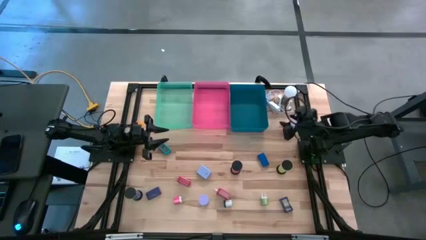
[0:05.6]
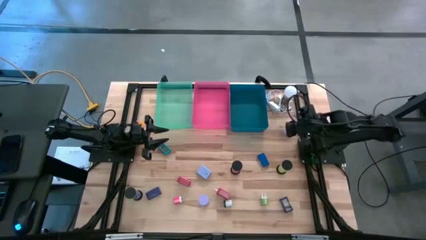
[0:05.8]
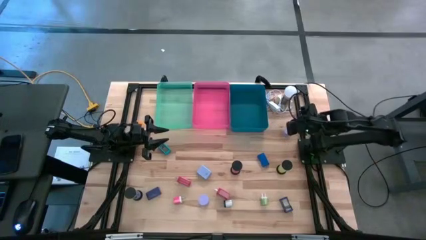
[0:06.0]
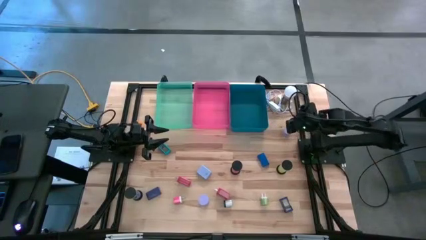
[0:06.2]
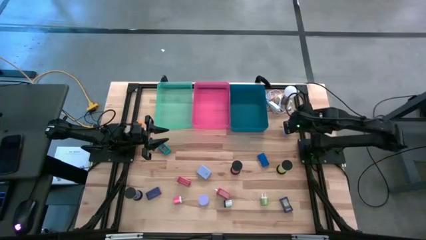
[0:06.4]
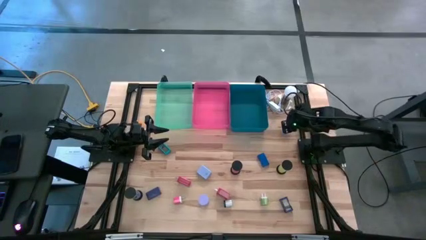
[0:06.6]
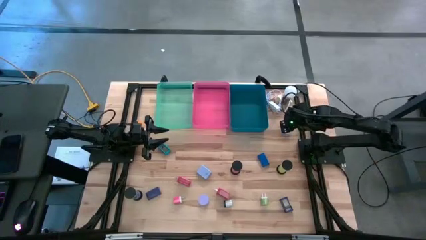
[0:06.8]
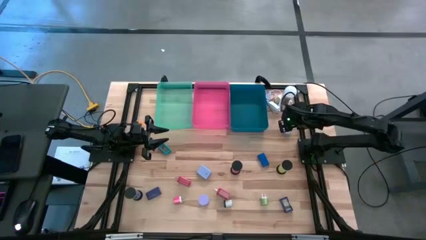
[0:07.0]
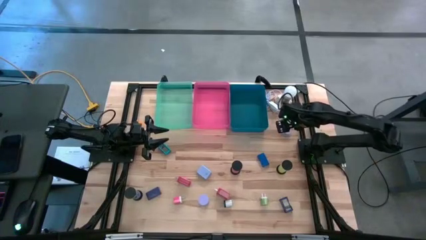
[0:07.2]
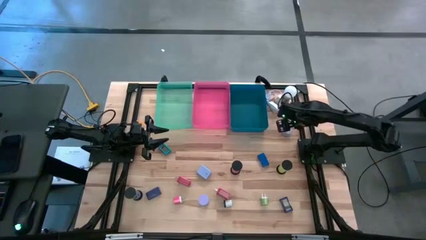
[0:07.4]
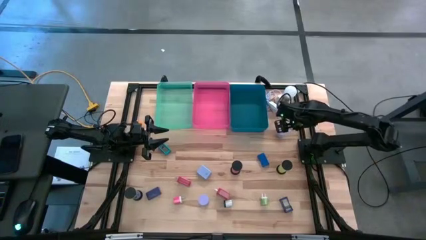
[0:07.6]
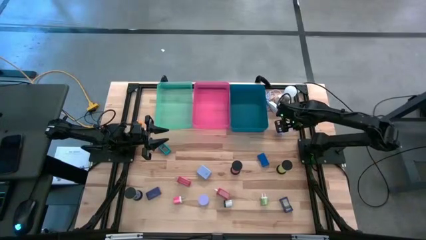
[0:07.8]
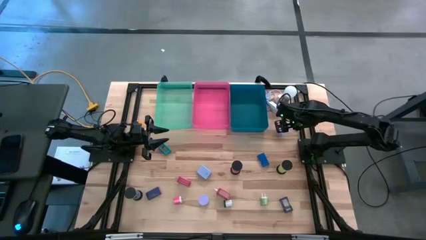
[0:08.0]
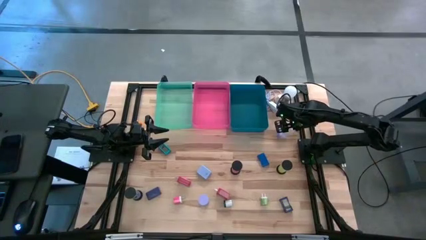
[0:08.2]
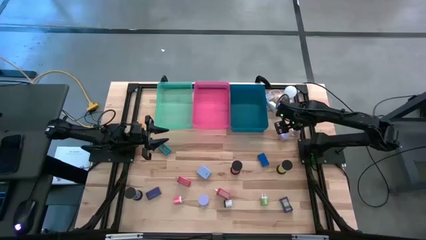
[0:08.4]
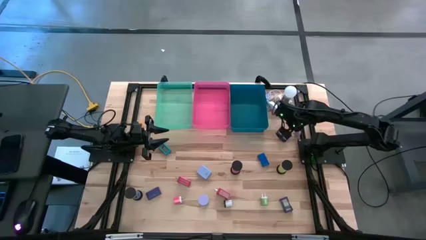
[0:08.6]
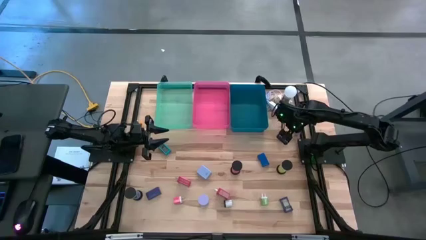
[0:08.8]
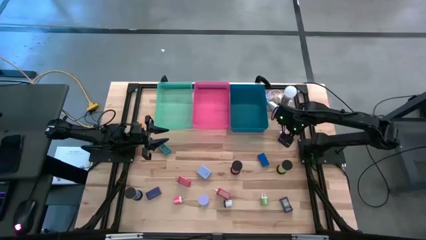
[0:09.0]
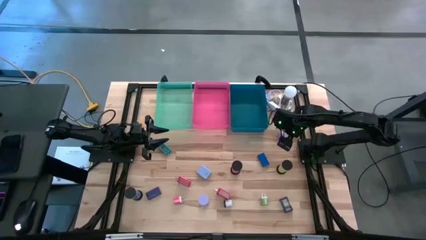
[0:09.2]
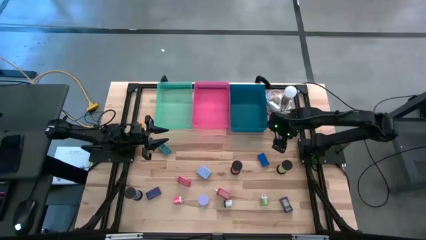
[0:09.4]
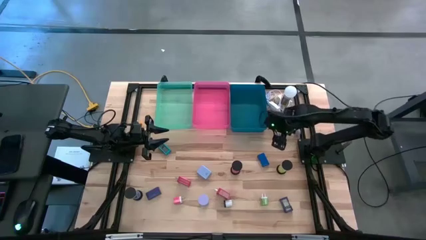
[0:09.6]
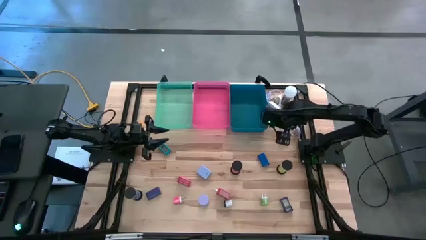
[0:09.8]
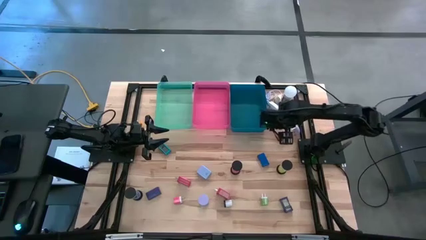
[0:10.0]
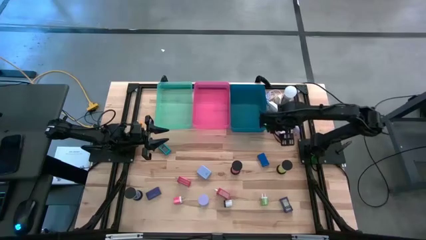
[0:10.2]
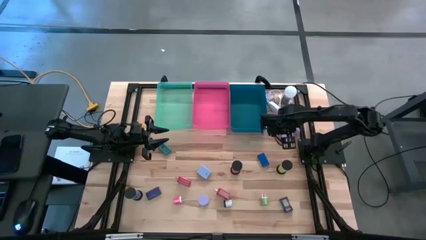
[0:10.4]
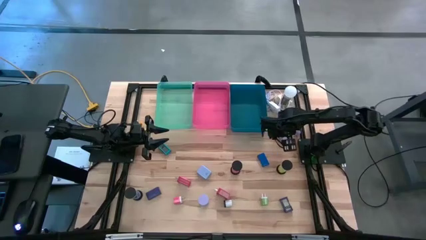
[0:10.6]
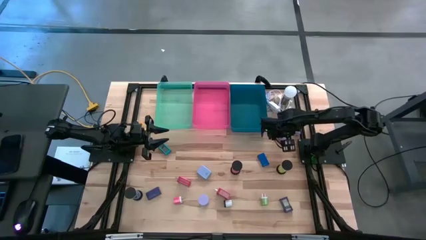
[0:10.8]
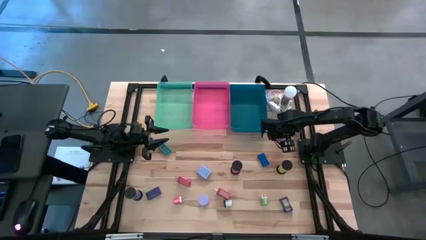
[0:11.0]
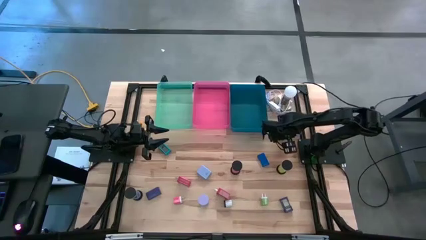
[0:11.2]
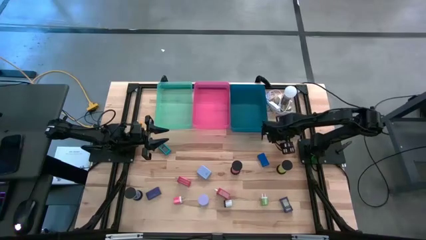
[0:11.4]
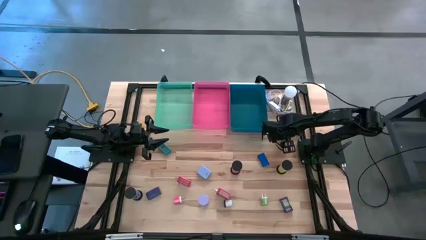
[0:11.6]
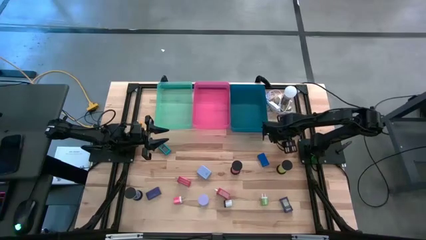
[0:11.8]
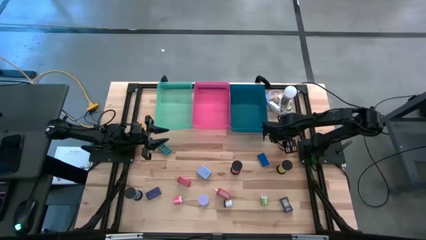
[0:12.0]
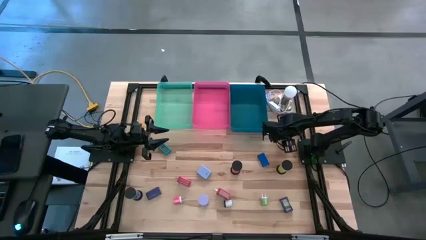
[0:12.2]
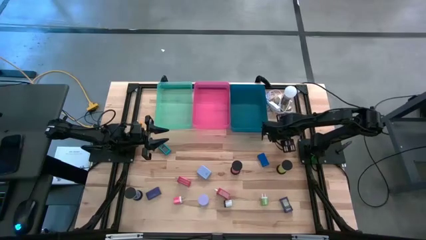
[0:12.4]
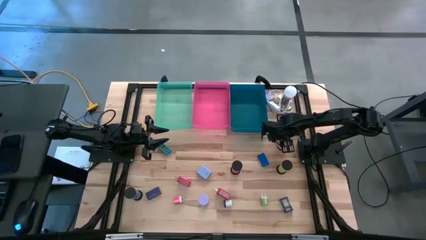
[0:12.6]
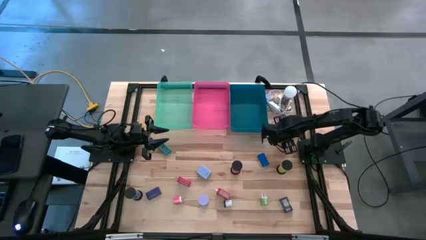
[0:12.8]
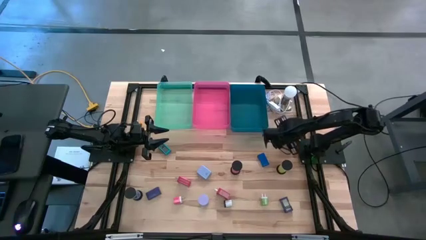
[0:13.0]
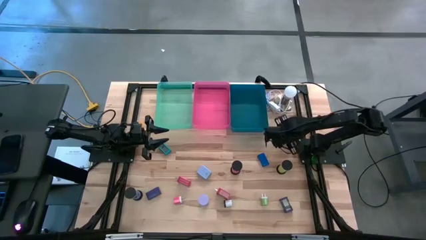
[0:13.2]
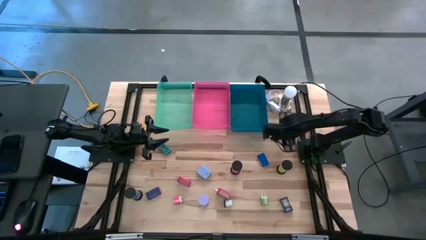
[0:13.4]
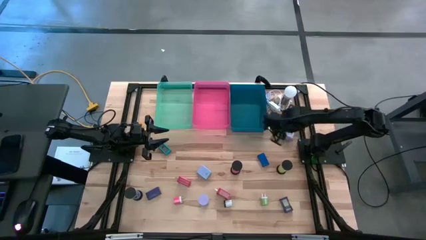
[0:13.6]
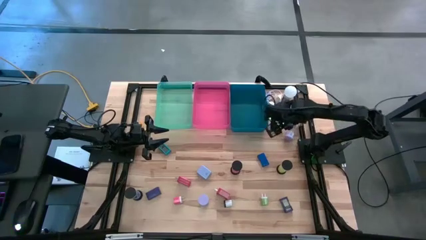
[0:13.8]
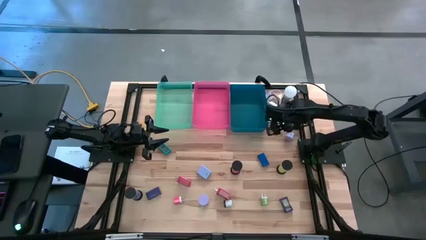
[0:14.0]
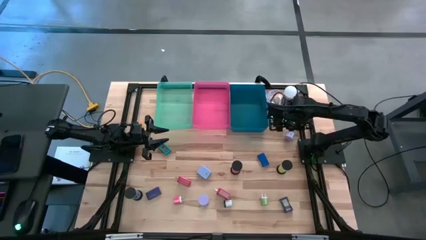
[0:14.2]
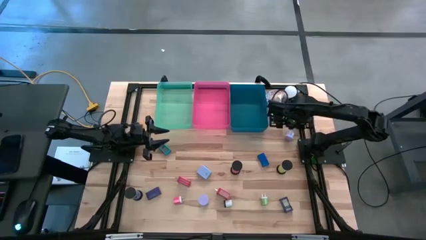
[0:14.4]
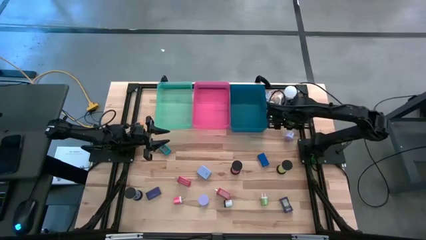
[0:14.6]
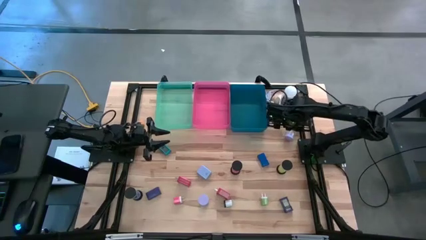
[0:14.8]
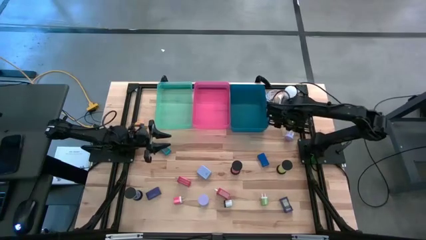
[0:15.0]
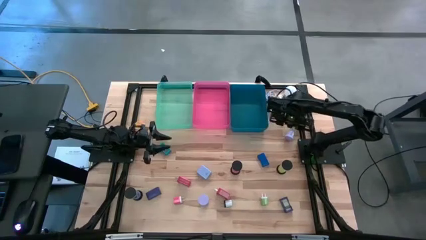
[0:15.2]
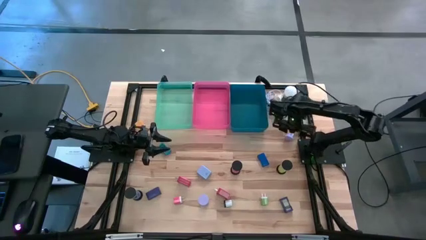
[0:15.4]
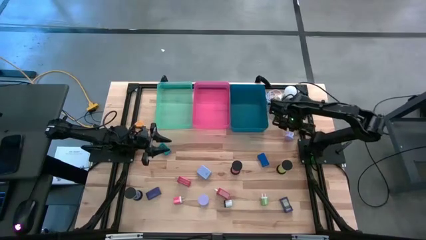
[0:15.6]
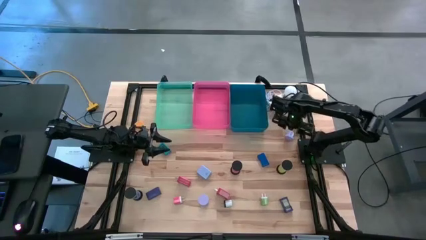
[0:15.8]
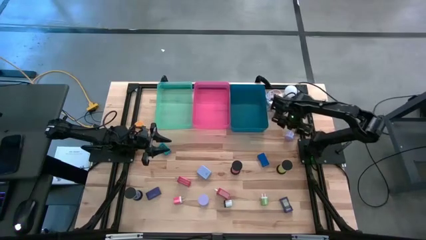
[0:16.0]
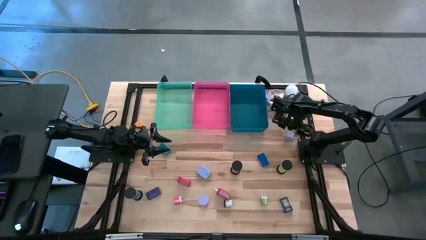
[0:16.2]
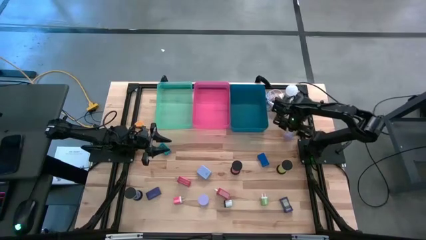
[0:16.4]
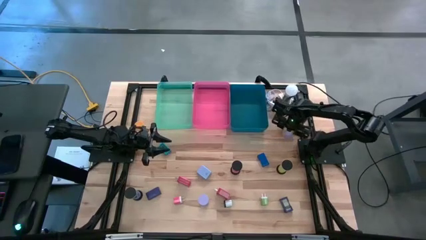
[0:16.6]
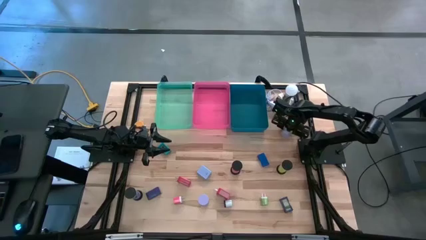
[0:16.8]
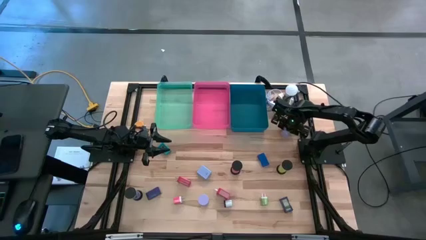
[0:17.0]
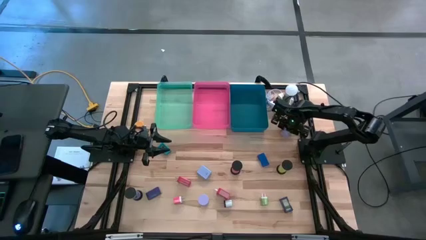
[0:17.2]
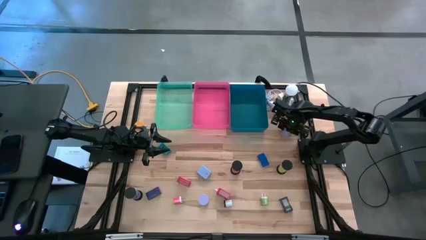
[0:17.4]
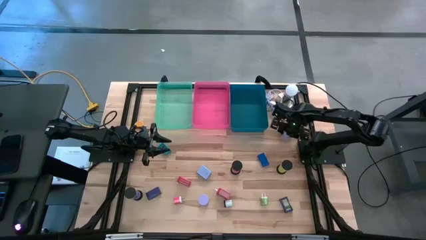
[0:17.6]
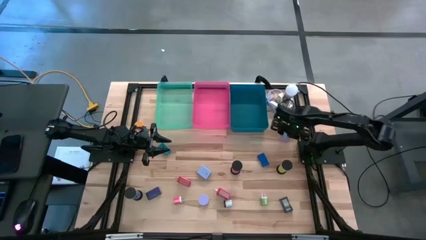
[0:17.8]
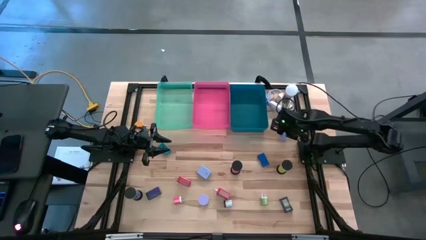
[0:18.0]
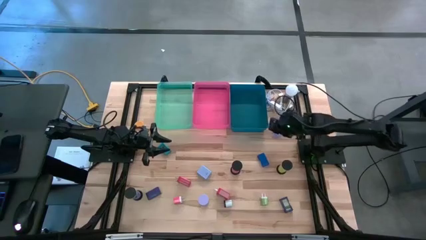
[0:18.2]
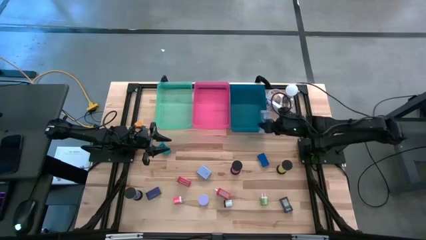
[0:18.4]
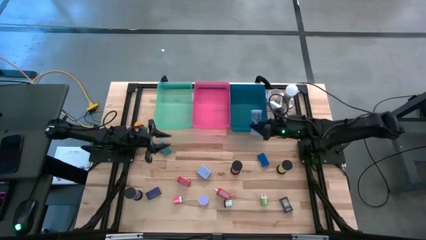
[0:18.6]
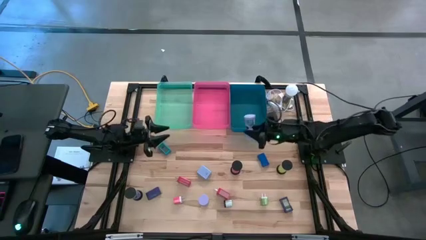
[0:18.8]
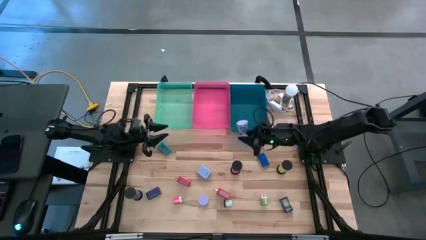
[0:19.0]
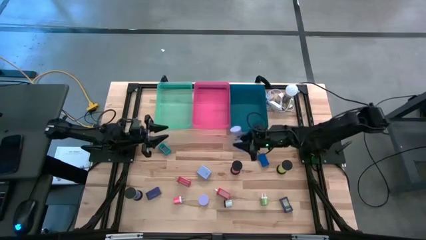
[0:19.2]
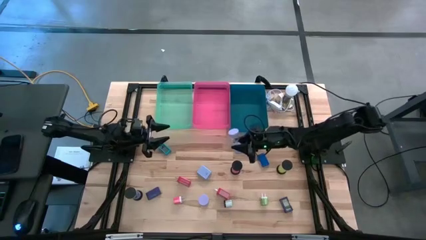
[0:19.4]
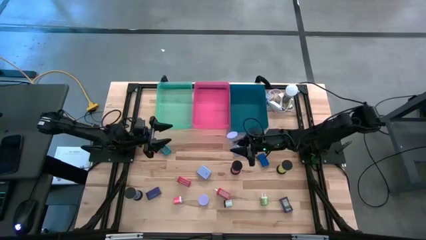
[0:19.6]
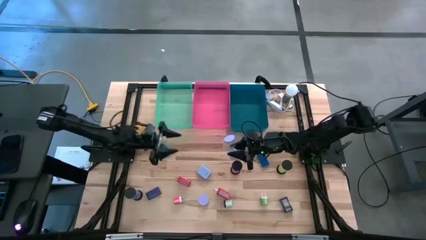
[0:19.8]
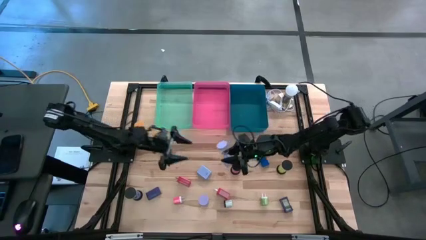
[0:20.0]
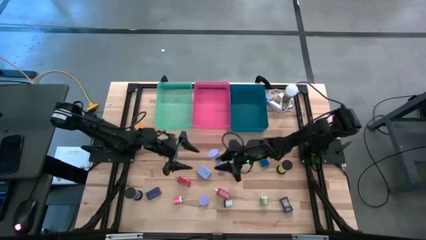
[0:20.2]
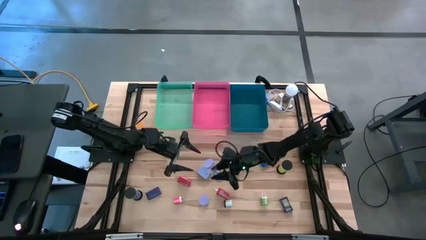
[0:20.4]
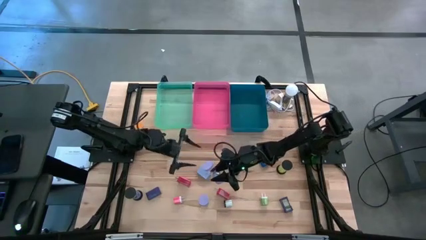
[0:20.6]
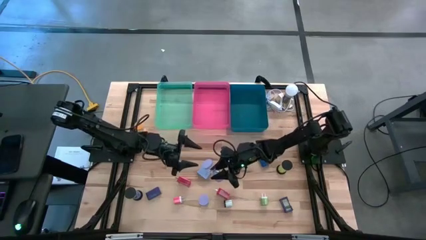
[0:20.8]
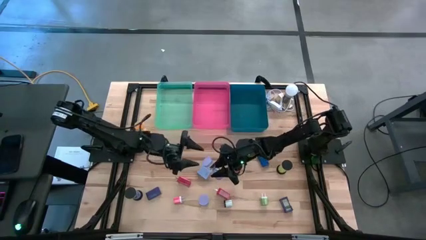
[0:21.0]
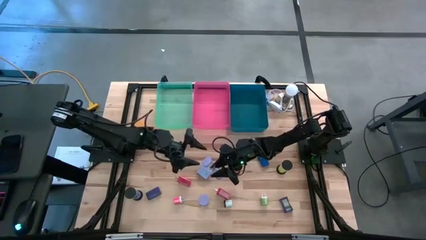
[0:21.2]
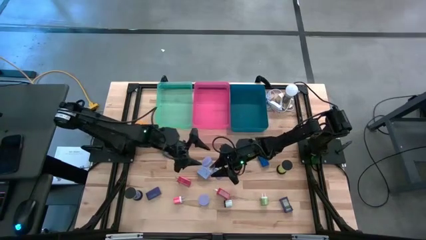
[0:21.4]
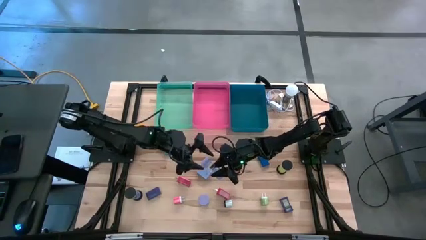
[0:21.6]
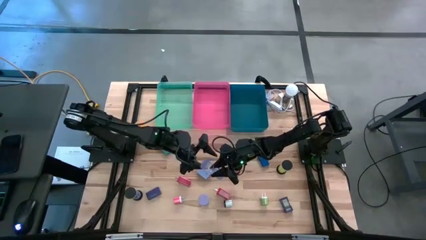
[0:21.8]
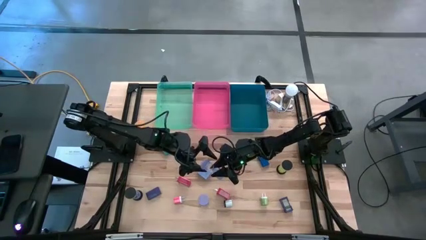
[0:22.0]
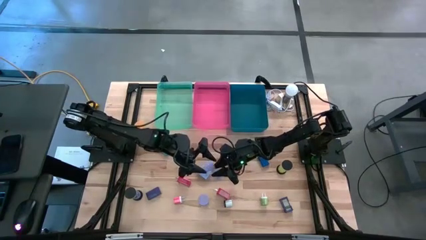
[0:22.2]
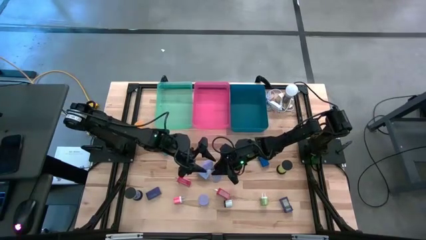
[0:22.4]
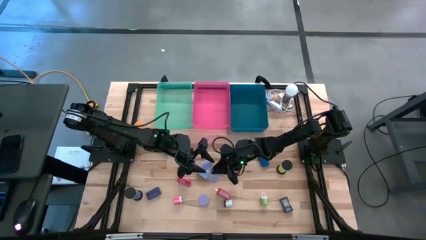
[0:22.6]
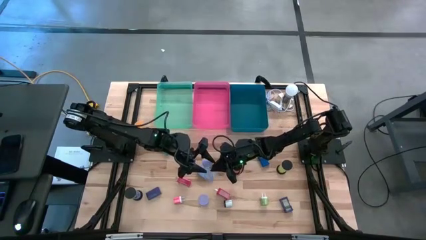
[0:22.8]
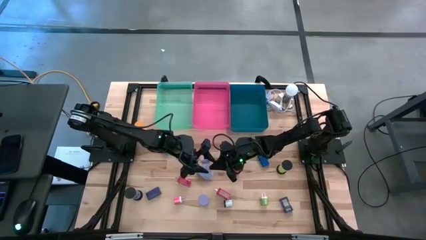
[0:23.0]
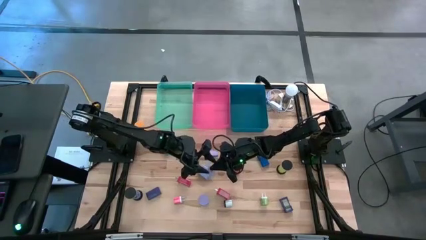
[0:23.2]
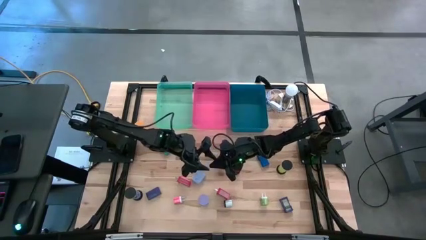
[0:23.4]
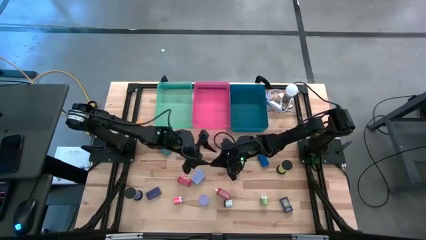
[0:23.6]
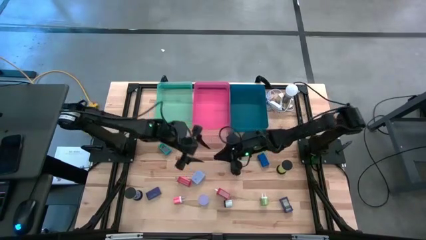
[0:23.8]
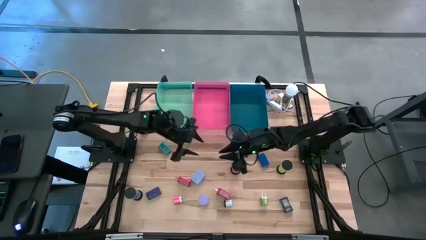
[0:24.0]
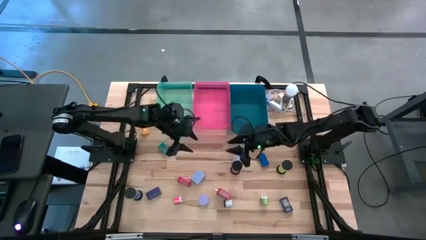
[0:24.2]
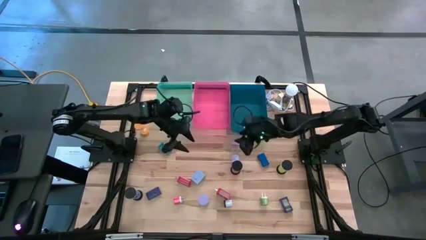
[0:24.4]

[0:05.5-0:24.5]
Task: Pick & Place Office items
Put the light purple hourglass into the dark blue bin
